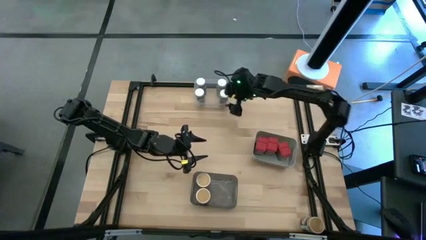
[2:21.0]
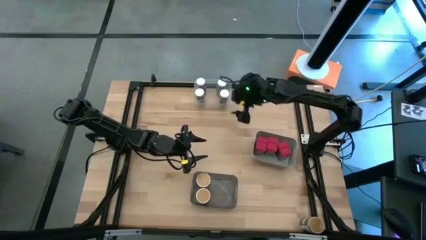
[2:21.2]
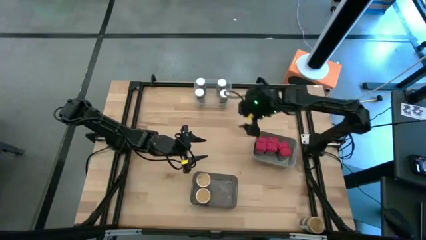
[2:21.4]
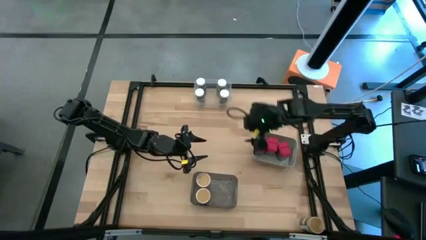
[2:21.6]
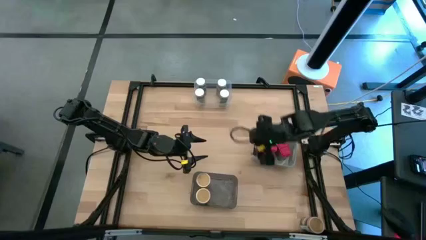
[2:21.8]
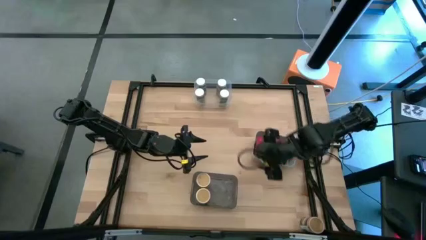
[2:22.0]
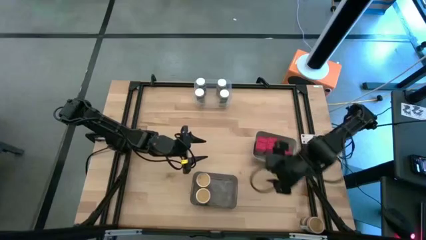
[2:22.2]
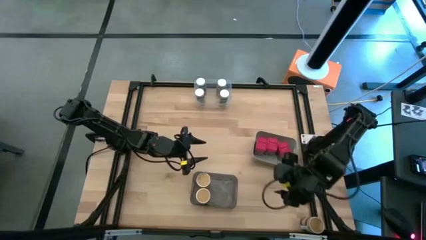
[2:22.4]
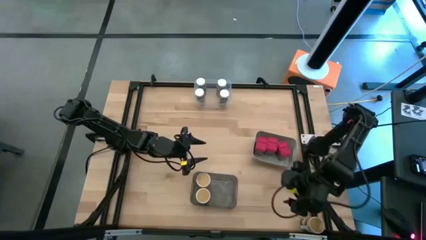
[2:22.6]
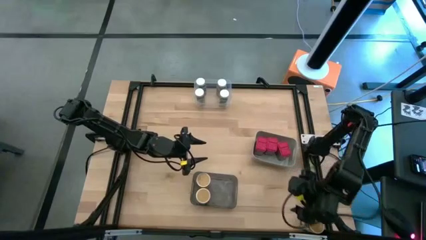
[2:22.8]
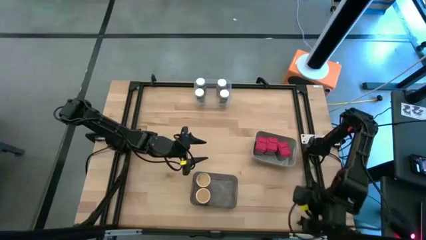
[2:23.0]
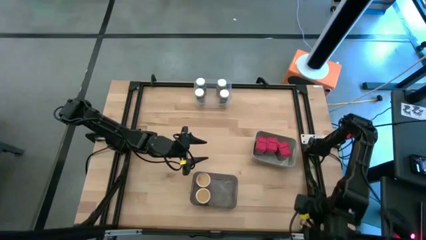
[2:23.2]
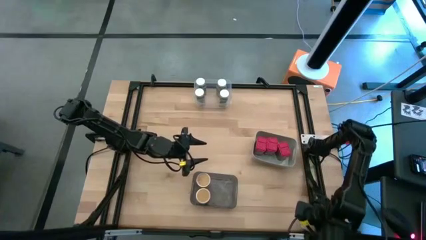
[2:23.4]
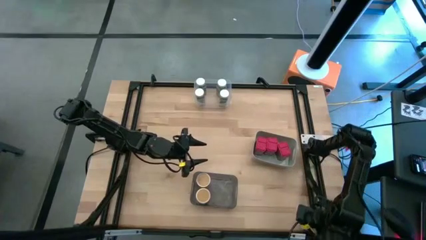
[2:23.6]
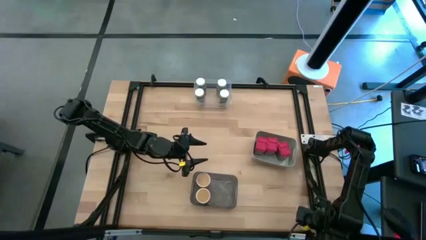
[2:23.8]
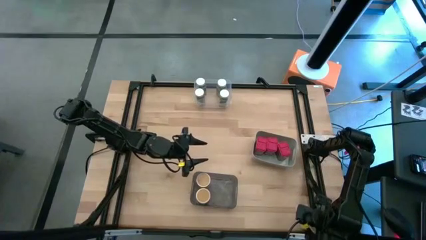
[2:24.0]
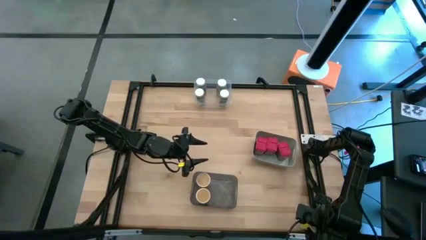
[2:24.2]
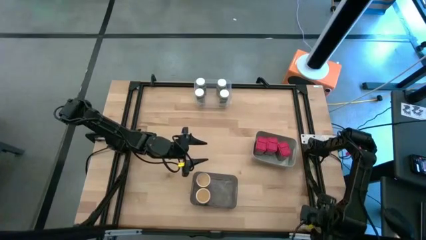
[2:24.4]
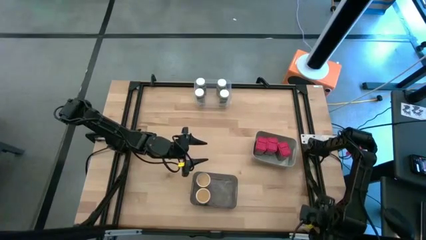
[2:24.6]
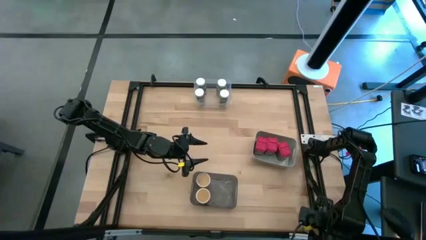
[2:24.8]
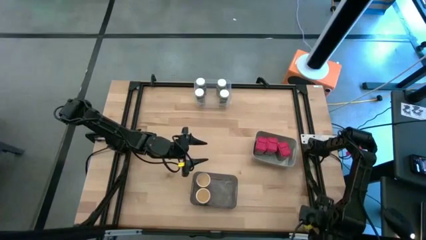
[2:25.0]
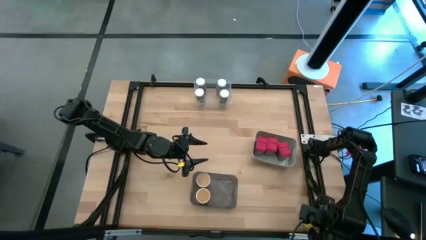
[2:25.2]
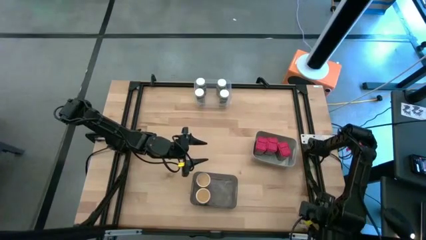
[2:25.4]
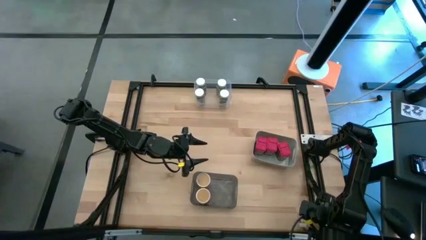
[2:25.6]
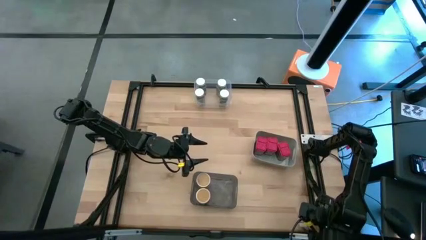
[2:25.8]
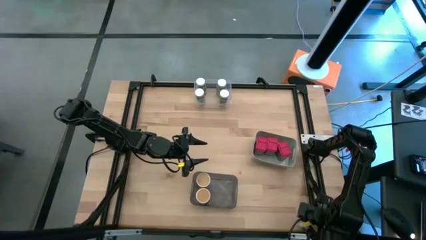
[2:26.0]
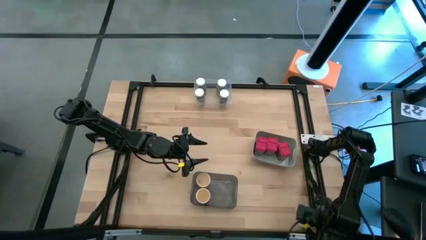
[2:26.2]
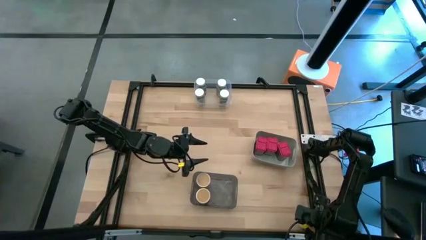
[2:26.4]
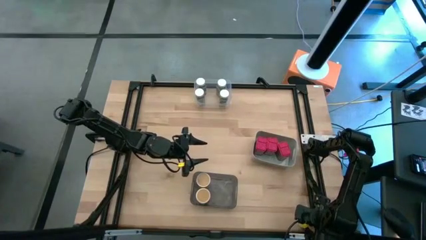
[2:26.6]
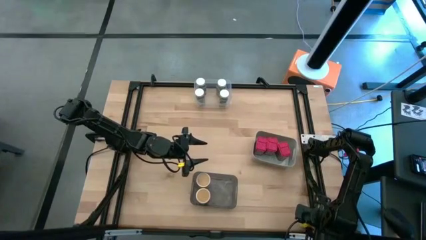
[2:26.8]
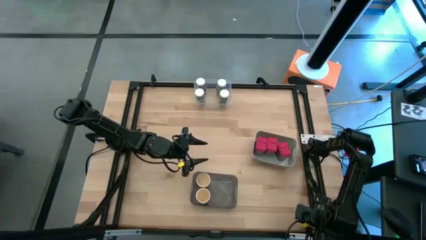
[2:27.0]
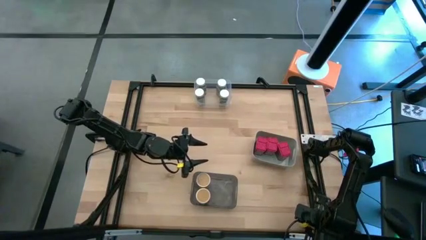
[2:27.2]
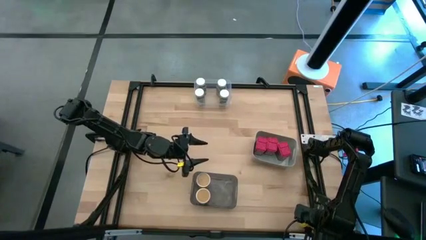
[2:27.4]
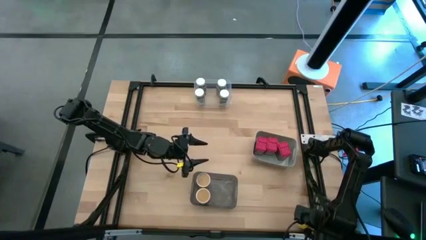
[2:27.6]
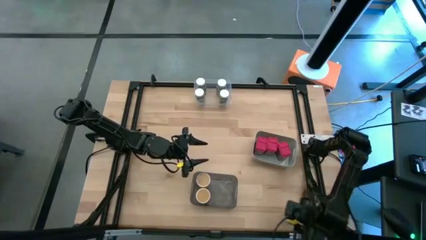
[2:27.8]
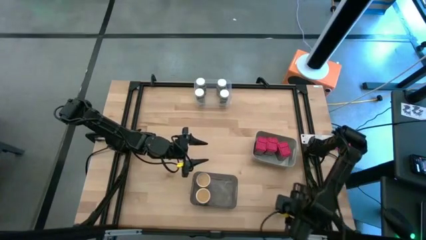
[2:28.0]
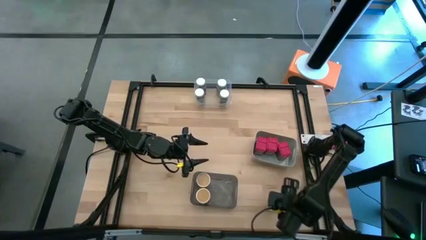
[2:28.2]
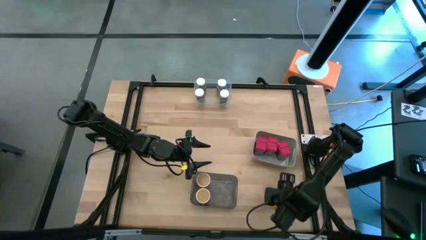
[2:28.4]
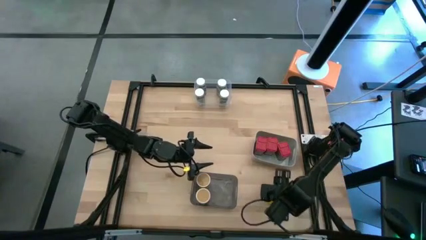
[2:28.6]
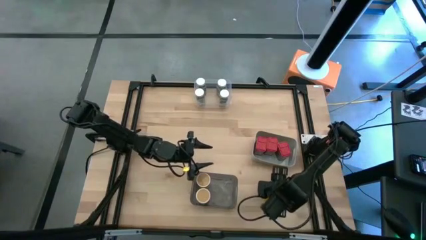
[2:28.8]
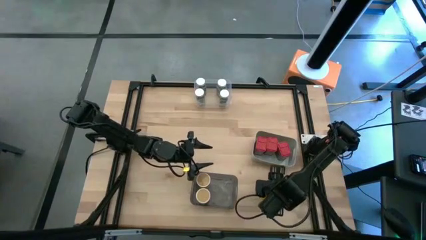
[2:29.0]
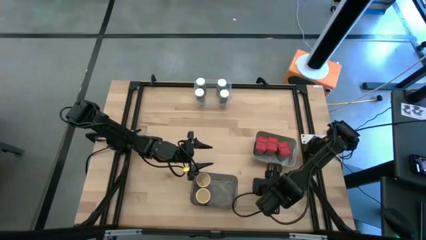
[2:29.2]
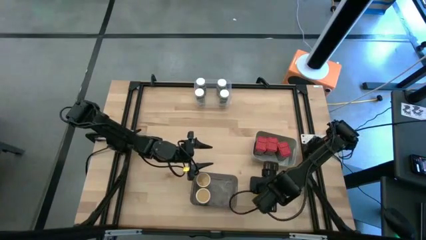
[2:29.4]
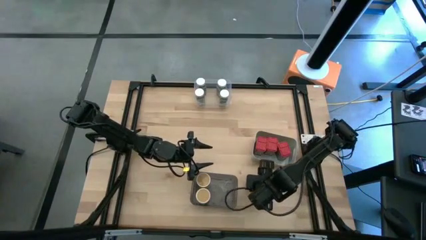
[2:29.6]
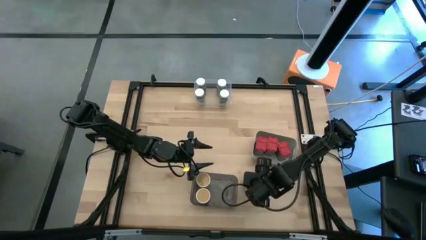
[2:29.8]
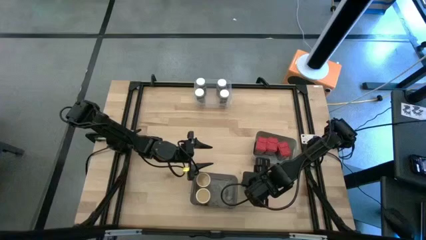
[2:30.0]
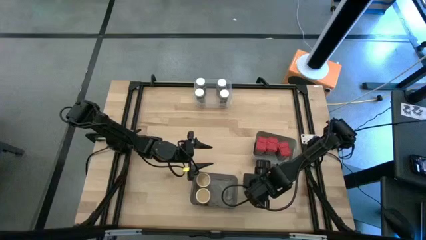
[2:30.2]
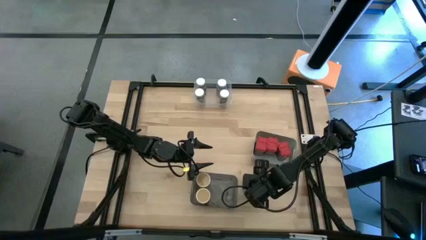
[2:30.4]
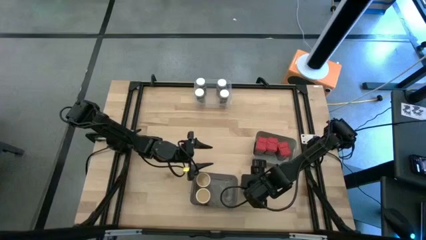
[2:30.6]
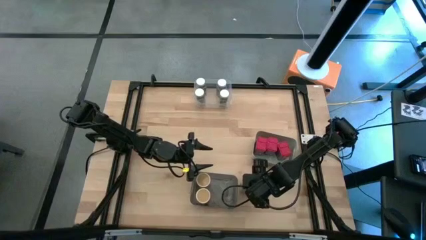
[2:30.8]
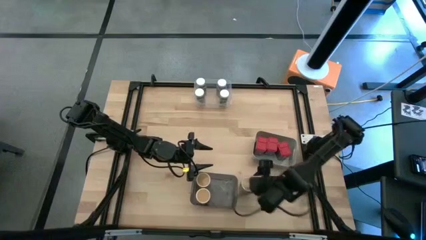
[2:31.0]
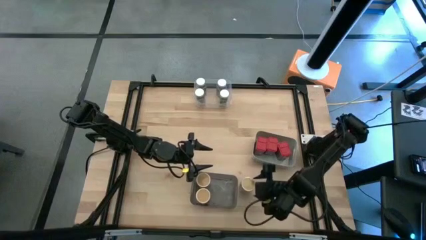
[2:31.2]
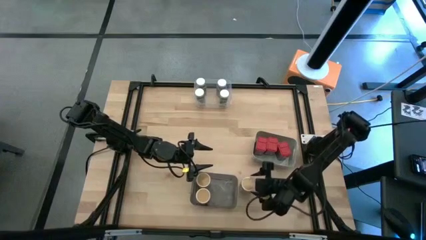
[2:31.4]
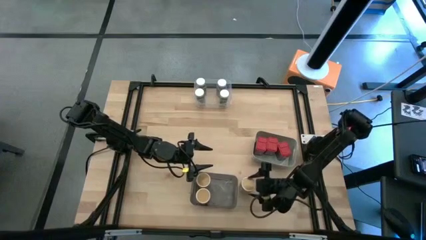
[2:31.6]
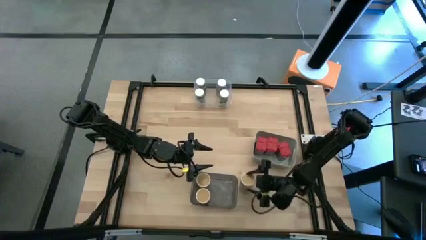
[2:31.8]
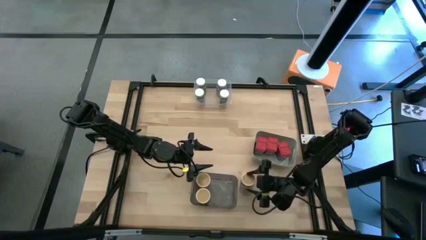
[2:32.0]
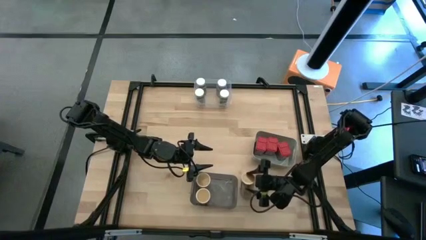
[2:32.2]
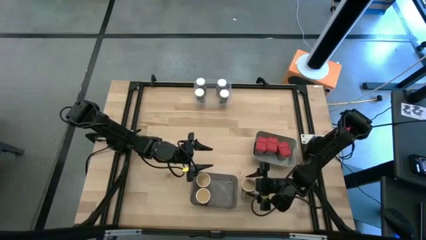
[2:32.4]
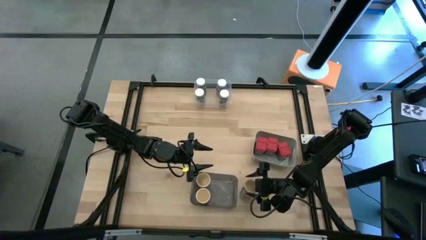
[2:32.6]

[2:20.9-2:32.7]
Task: Sort spices by type
Put the gold seasoning bottle into the black bin

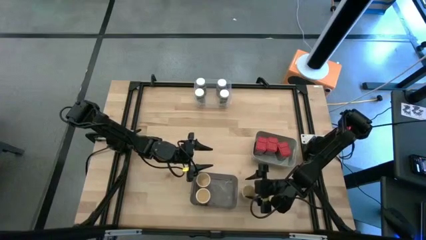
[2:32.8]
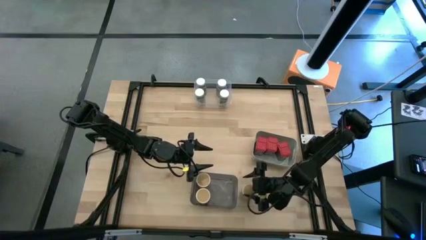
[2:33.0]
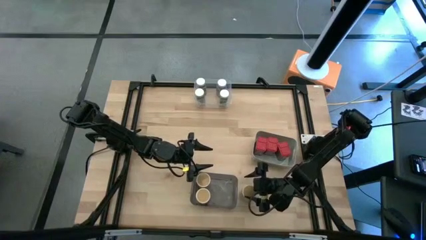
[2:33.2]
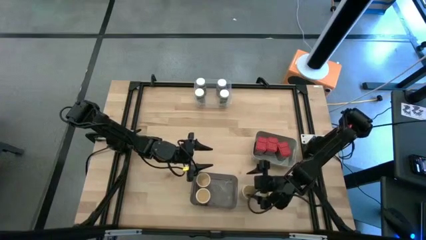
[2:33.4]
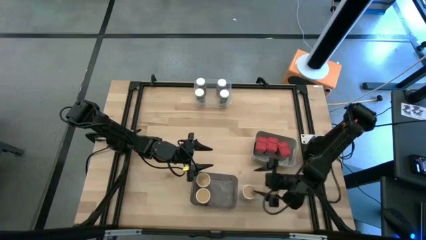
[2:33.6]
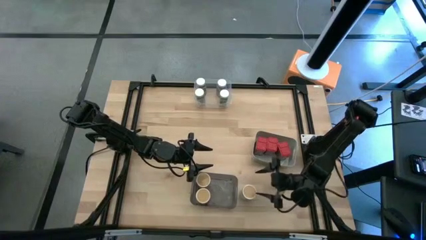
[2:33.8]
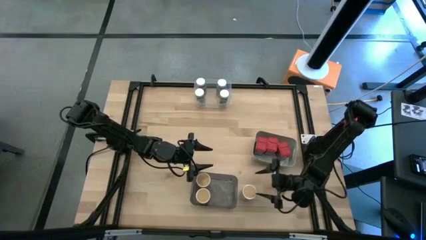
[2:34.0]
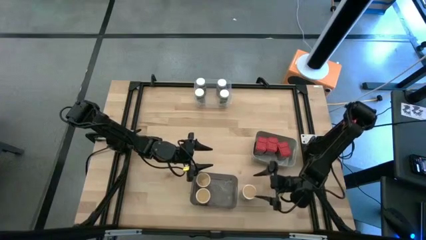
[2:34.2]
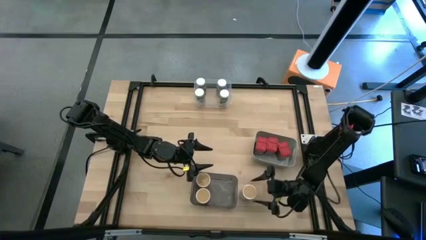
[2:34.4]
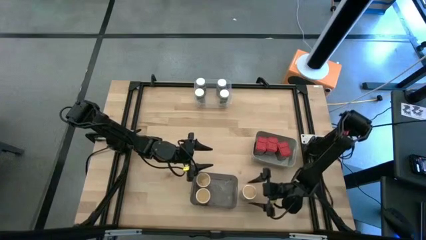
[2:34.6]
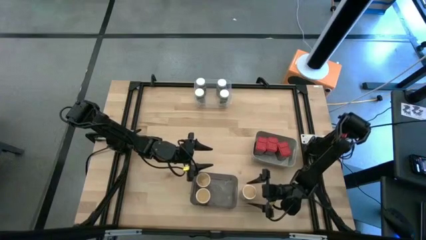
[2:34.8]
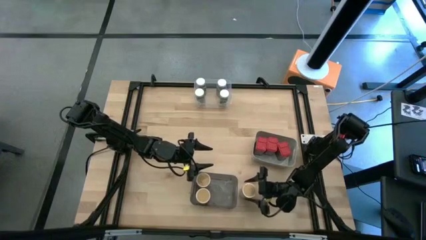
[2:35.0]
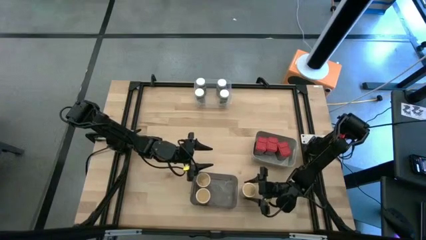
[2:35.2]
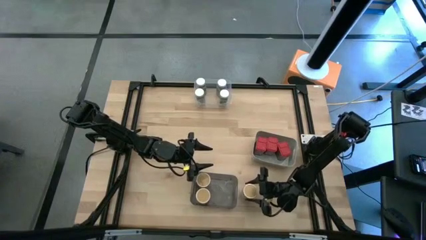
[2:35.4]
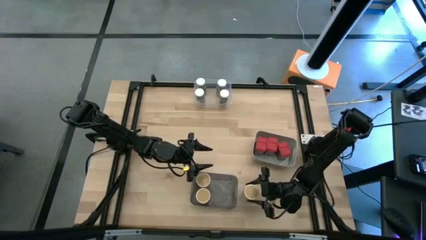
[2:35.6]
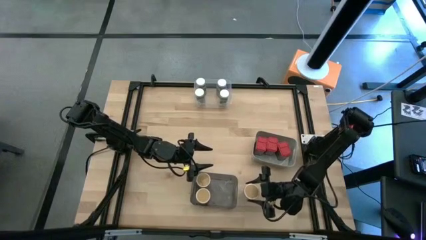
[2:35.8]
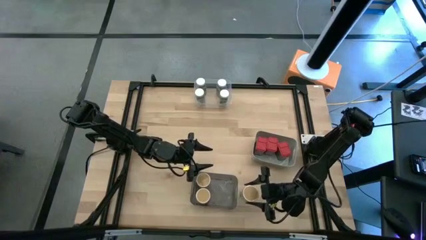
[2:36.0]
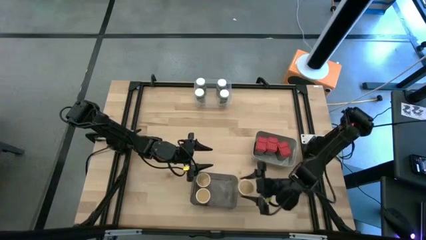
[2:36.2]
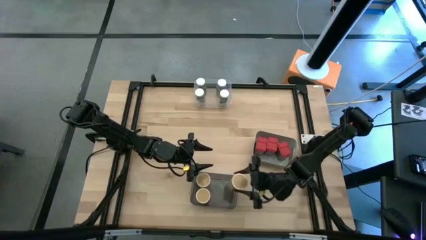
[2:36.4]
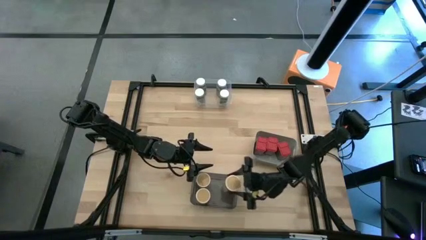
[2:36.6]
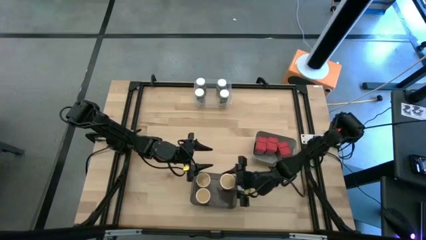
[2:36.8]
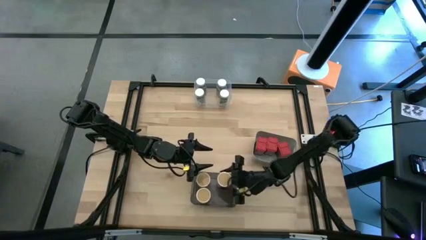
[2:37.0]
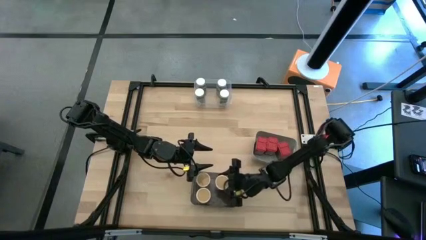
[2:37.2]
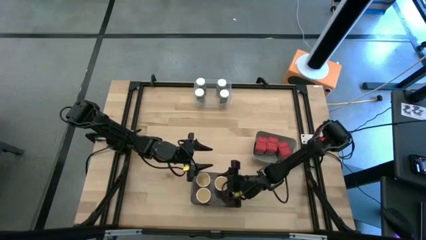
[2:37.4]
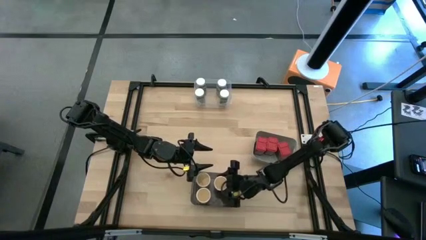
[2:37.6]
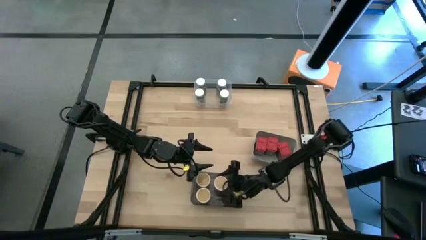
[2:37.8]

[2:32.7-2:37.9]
Put the gold seasoning bottle into the black bin
